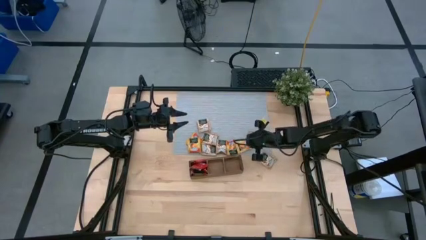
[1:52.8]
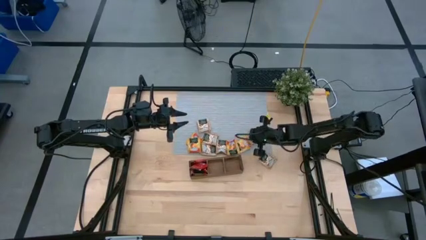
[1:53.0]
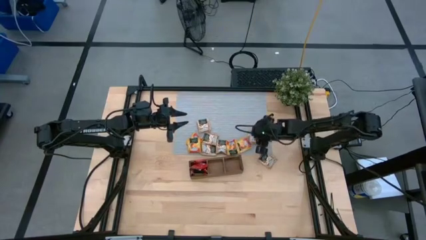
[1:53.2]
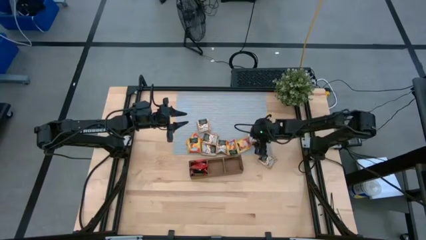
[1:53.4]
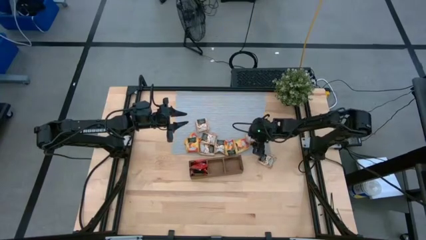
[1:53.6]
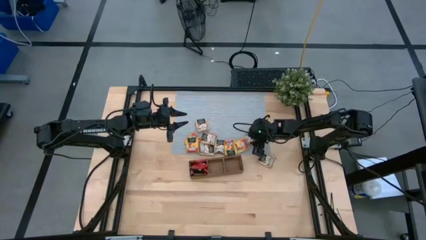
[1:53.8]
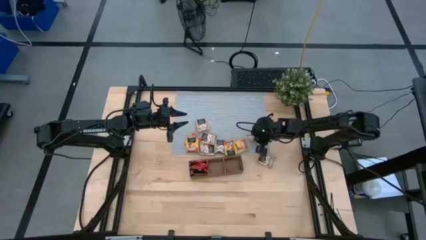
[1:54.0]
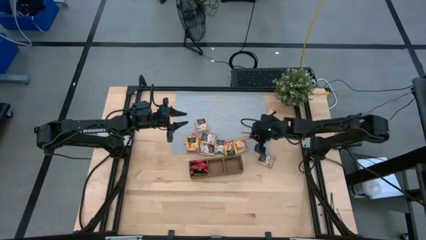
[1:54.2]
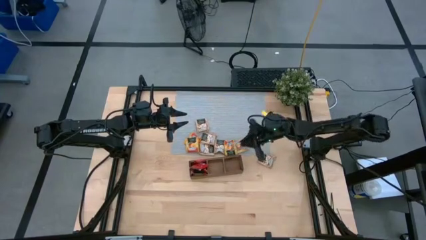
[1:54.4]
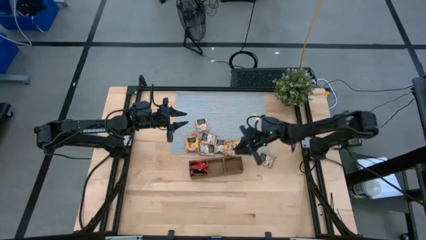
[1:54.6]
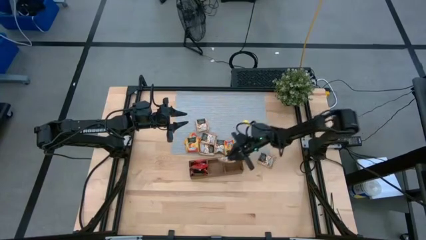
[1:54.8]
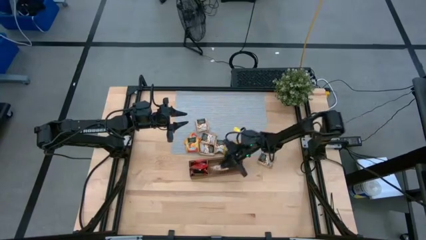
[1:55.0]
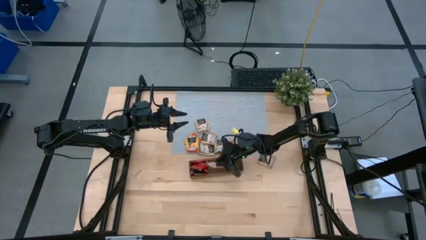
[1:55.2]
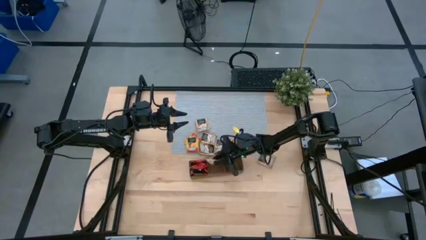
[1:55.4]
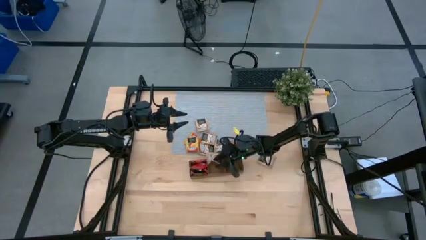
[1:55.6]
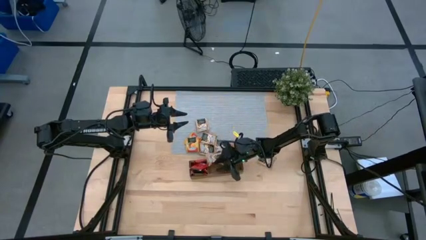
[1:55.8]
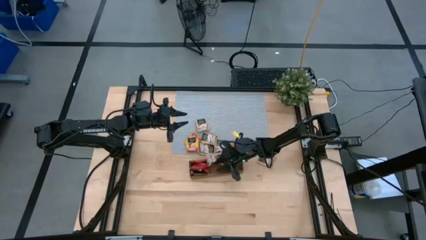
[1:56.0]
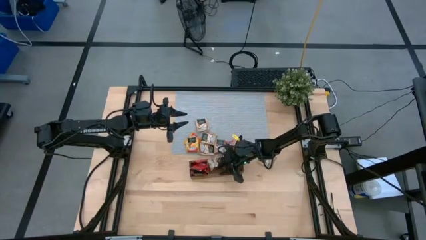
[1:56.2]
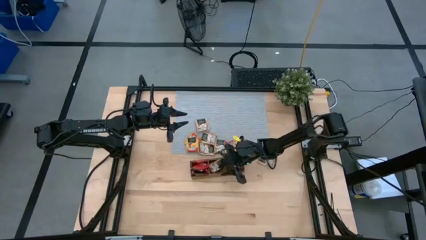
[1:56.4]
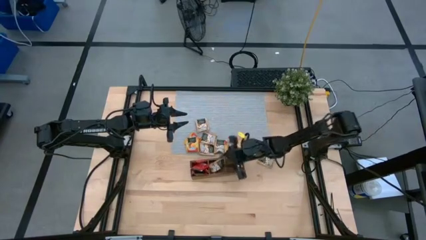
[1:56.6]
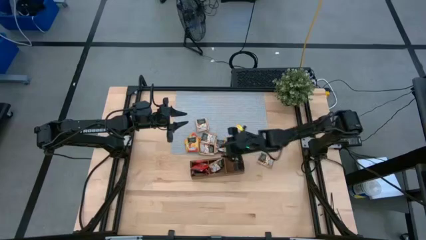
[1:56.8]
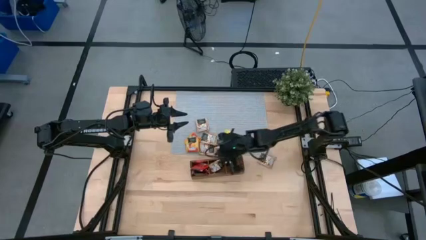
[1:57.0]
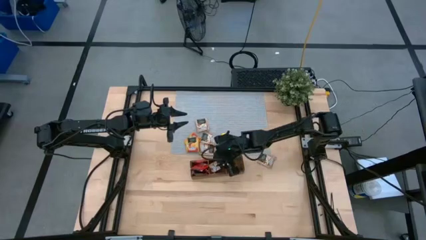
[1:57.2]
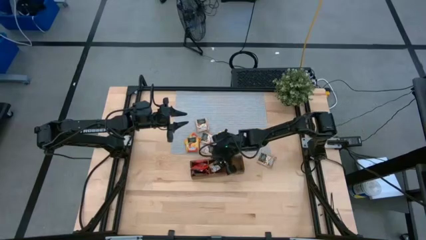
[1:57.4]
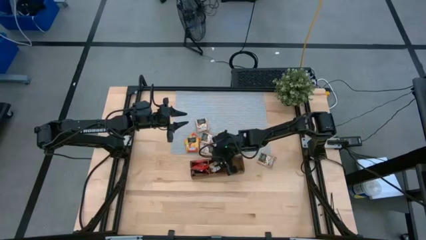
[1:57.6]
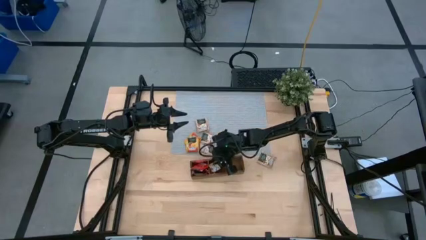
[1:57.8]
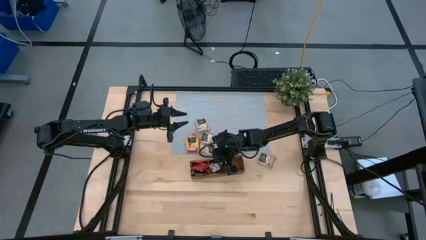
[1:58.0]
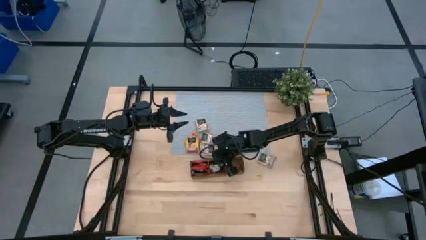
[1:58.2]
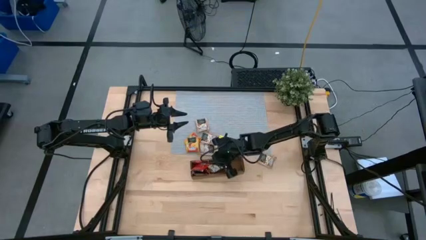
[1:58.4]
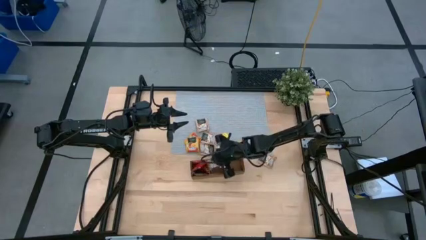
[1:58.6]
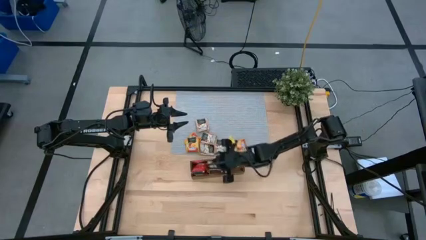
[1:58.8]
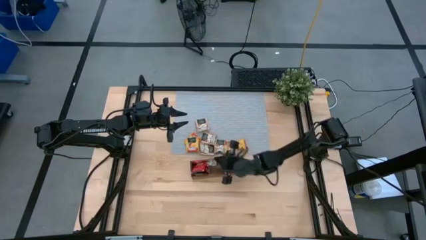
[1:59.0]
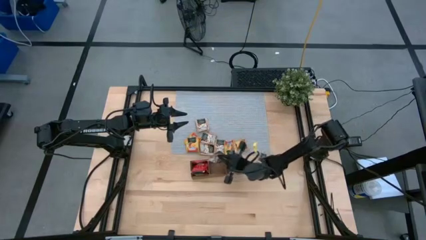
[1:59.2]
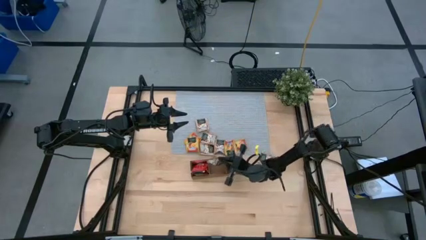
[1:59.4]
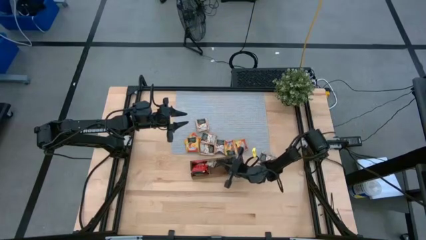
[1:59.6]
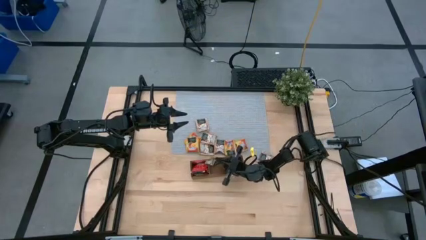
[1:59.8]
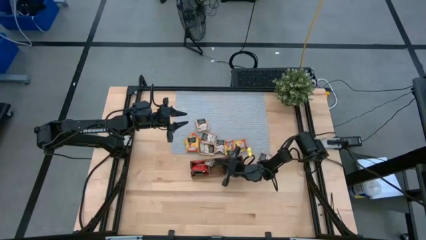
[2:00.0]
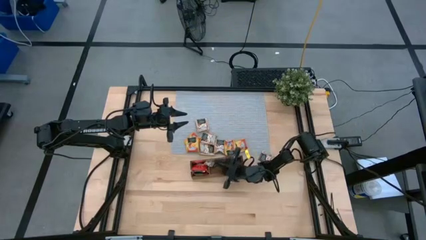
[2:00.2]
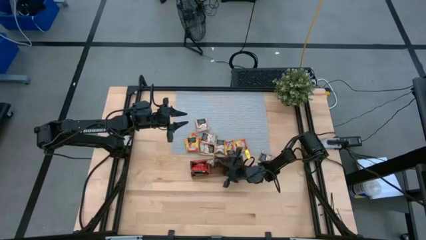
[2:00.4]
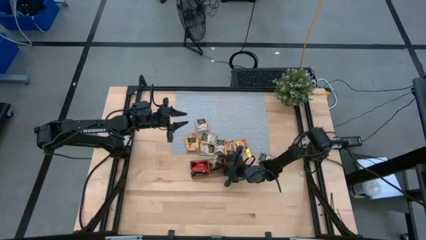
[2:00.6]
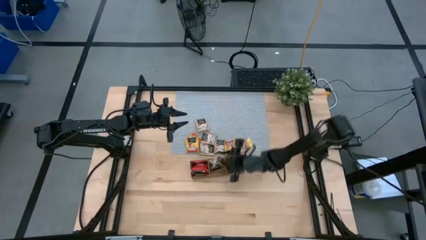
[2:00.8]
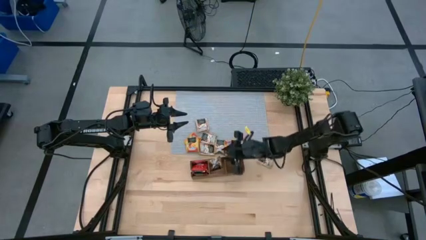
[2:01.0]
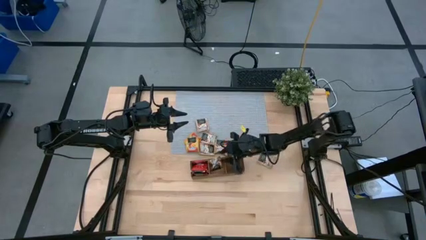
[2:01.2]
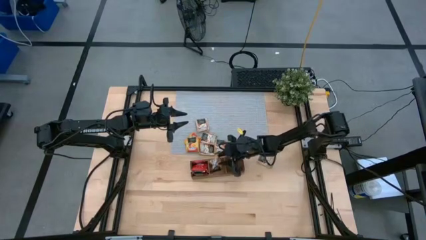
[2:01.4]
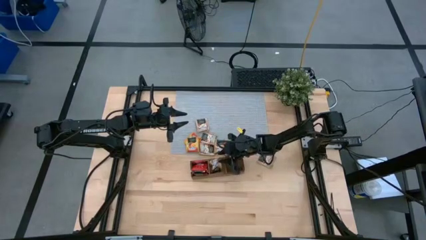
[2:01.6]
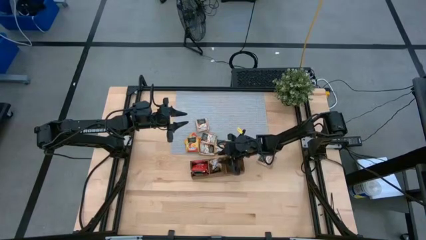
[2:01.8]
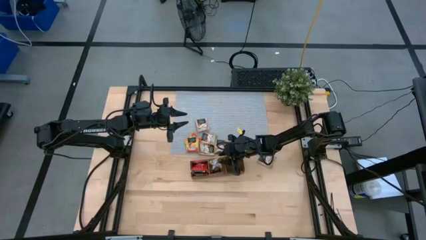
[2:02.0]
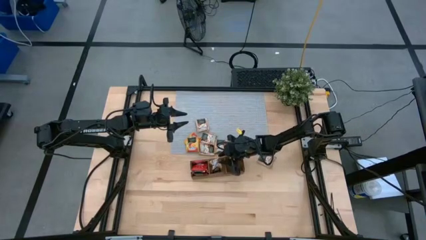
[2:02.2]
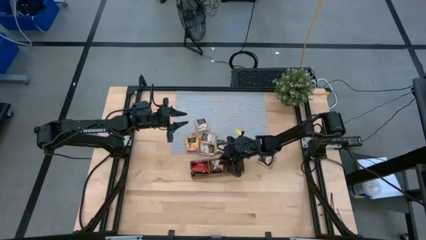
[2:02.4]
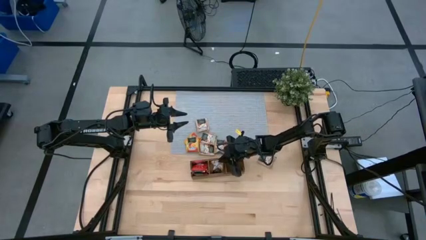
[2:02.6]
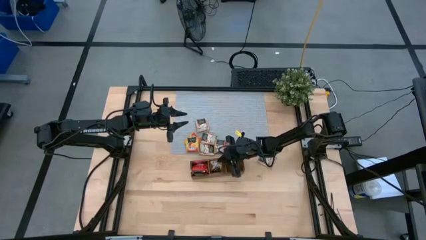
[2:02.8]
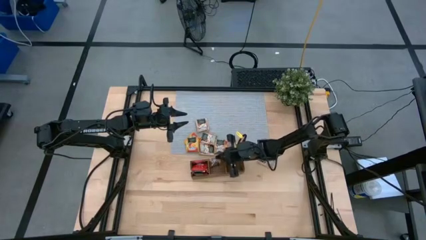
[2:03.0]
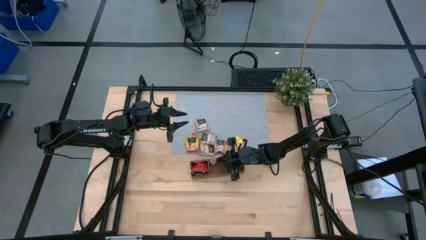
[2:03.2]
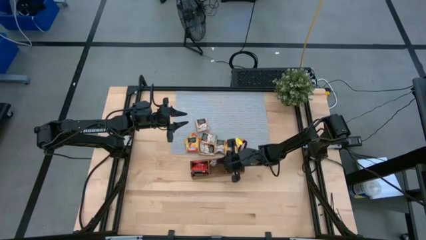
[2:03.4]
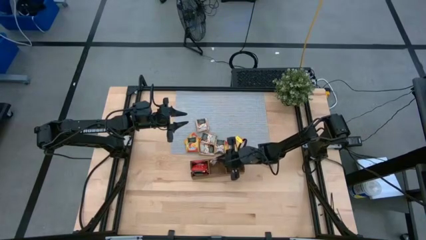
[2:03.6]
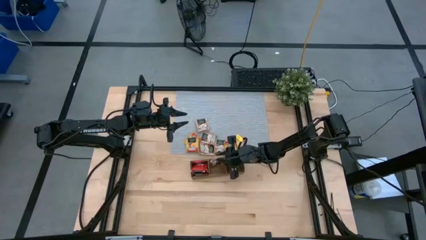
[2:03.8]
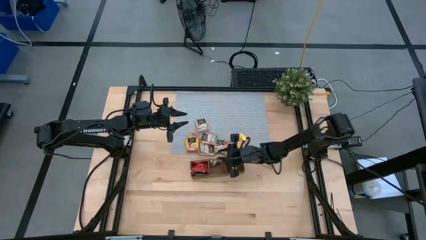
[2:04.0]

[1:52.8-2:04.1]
Task: Pick & Place Tea
Put the brown tea bag into the middle section of the wooden organizer

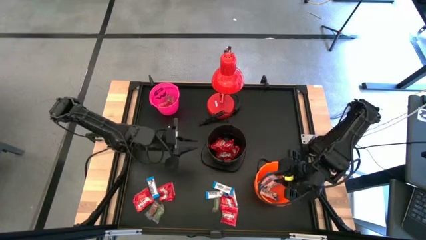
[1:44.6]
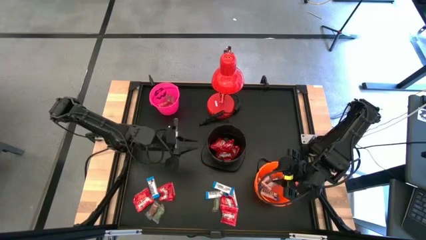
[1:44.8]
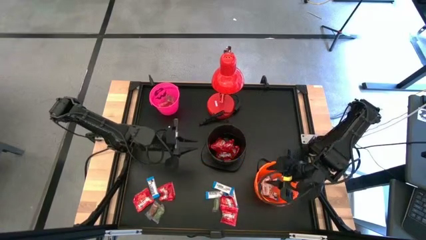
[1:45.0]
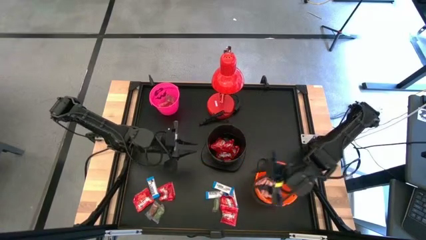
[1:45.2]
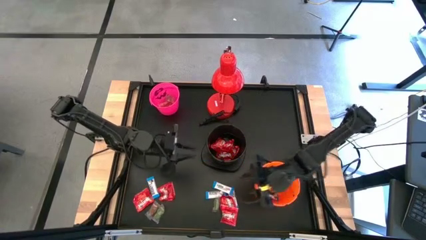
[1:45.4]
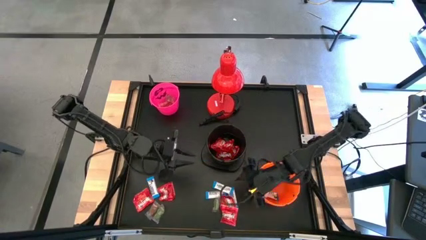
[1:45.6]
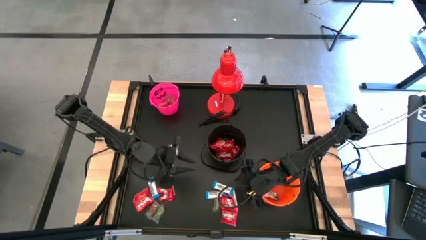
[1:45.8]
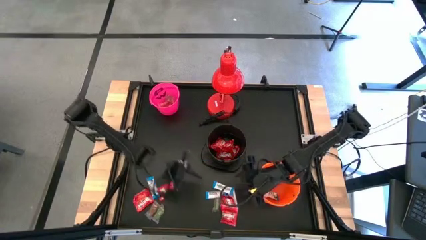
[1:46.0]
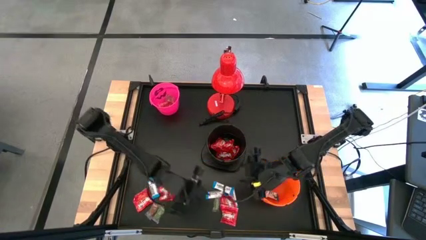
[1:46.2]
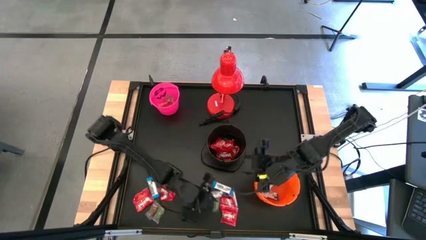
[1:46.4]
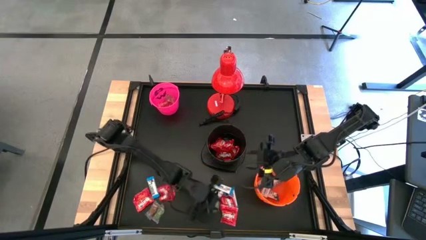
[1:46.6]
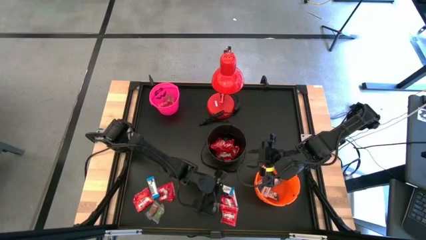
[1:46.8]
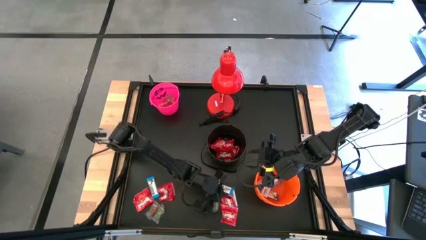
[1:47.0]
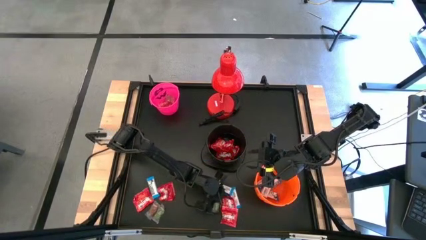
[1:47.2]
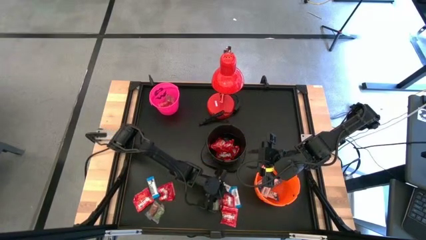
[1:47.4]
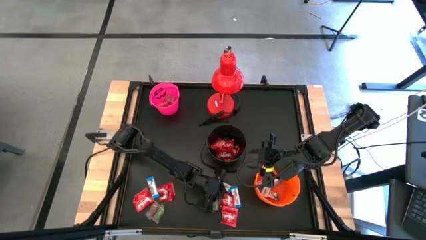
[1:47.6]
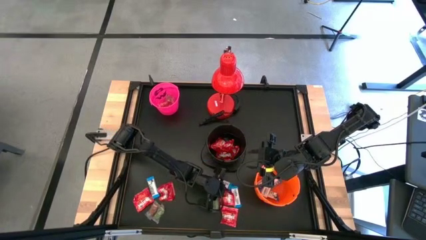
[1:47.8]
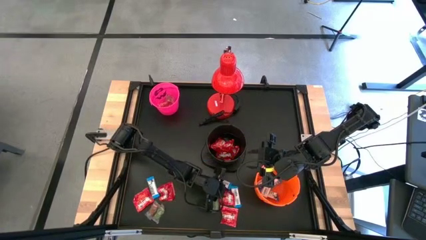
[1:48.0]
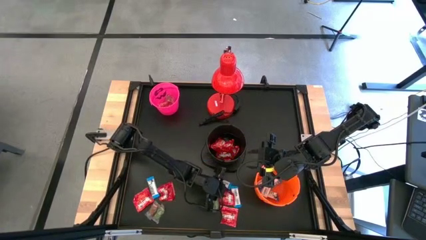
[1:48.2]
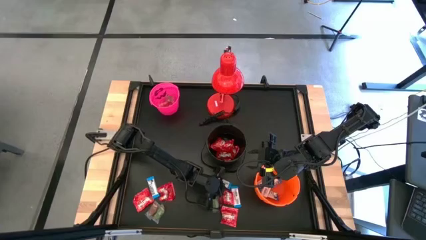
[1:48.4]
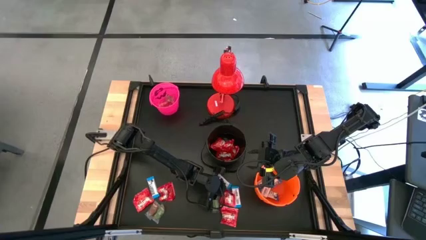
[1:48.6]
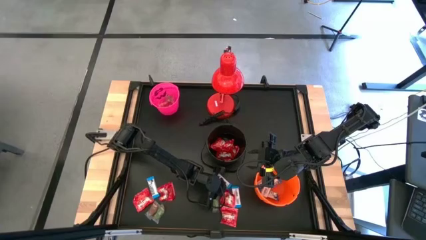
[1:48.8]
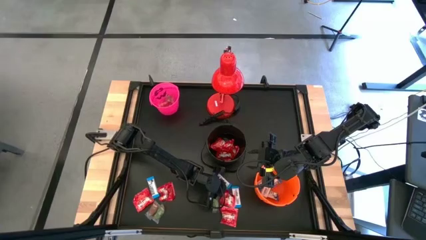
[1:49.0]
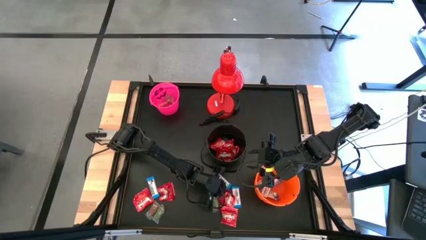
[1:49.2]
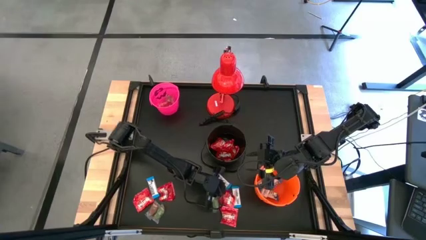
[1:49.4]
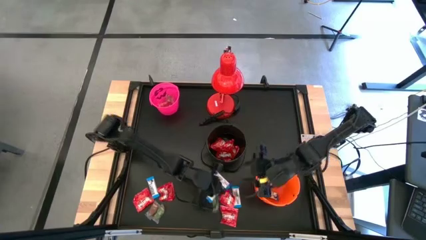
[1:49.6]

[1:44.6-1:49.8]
Task: Organize candy in baskets
Put the red candy into the black bucket
